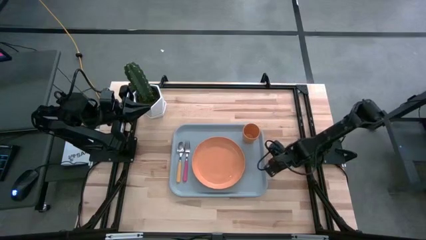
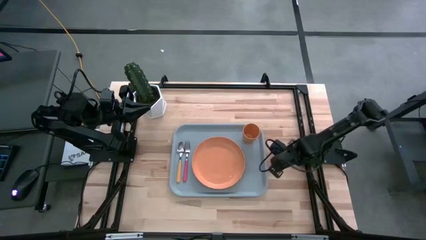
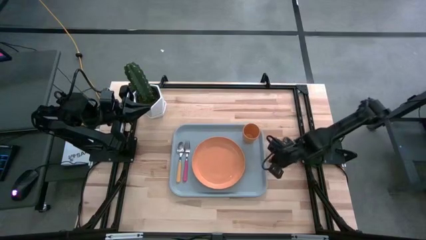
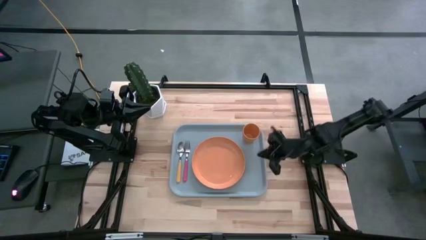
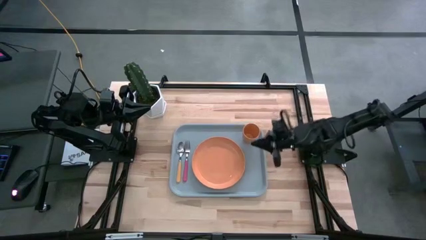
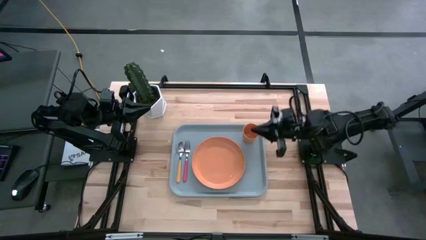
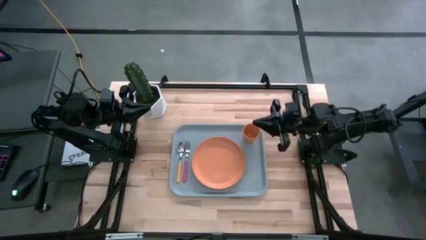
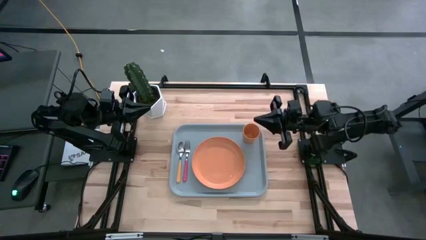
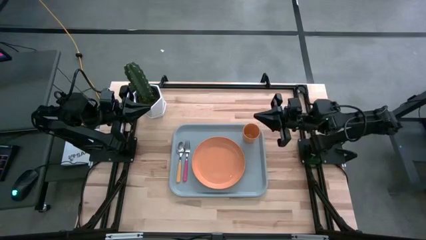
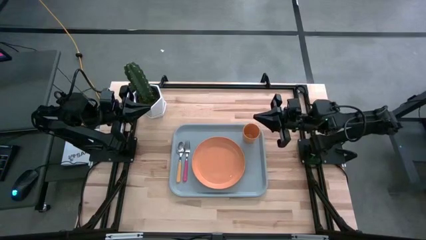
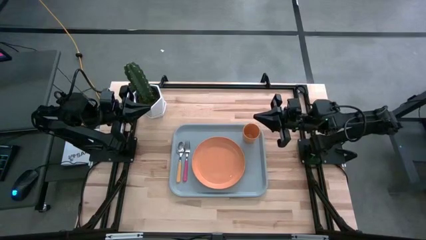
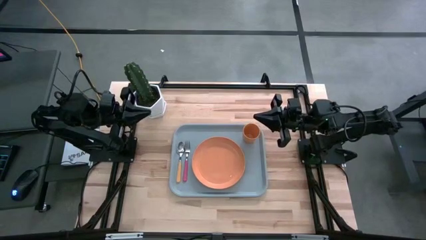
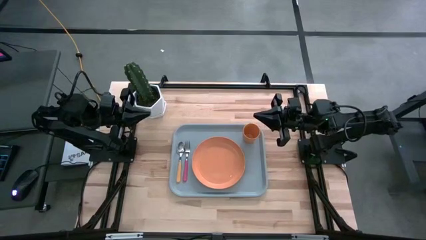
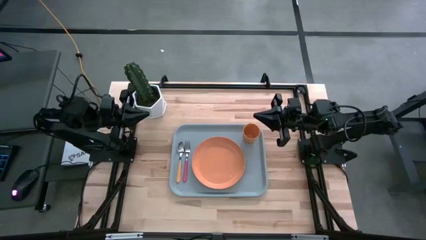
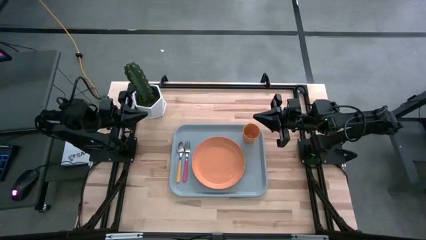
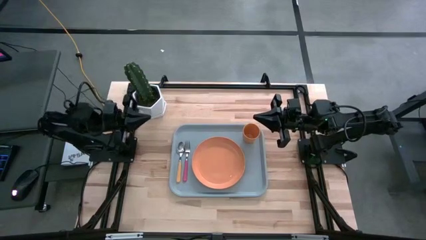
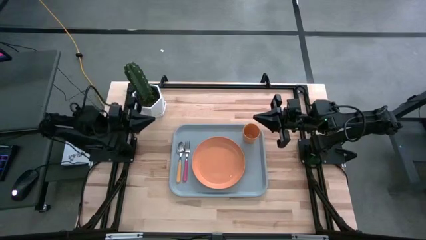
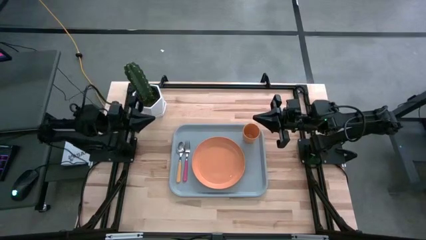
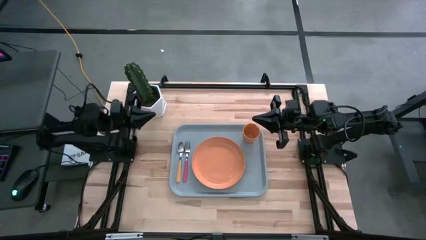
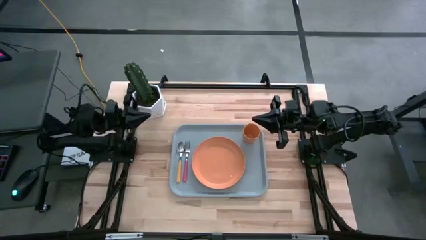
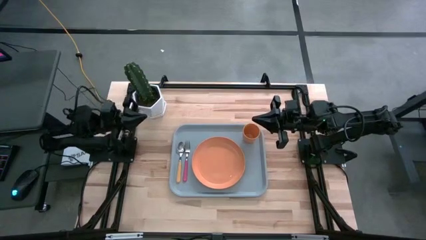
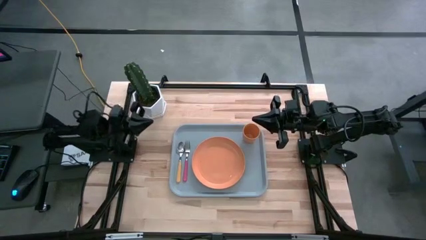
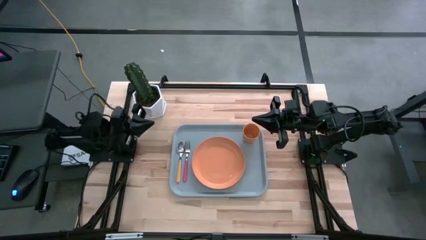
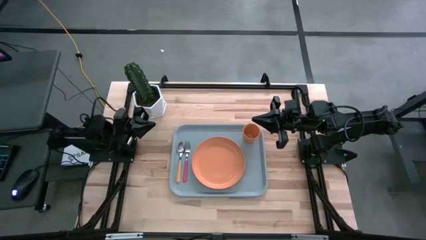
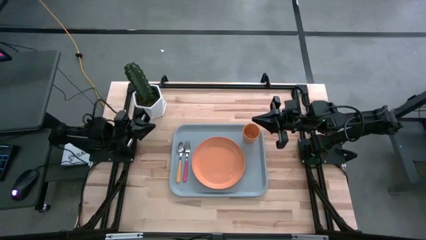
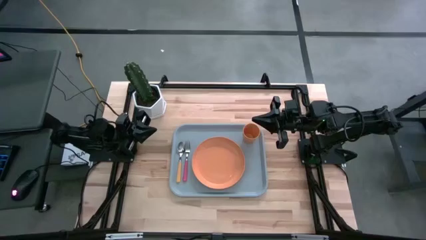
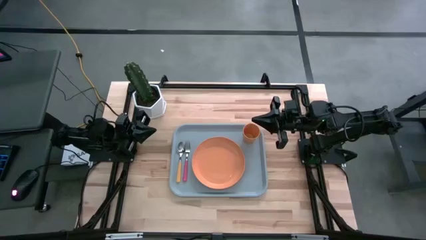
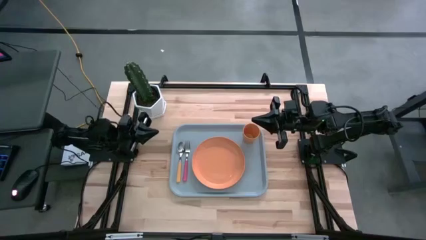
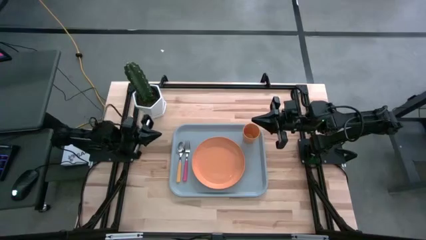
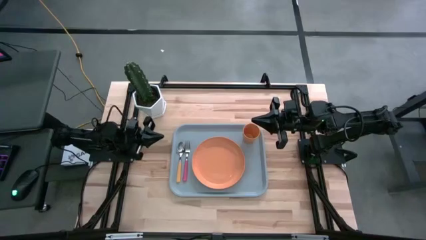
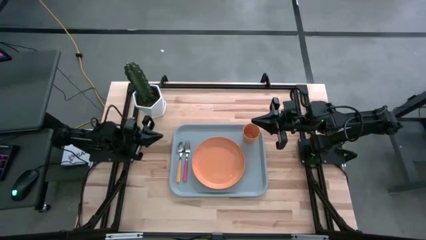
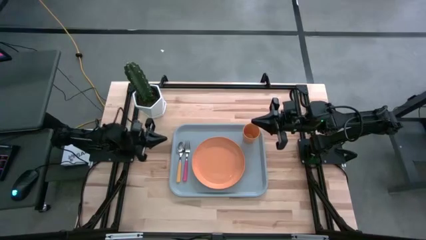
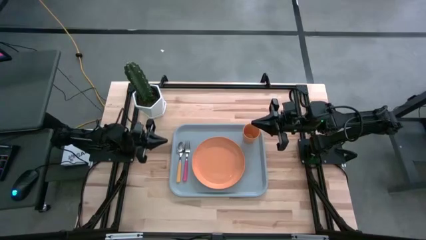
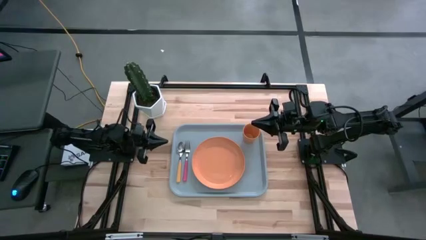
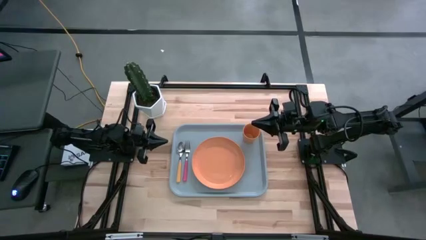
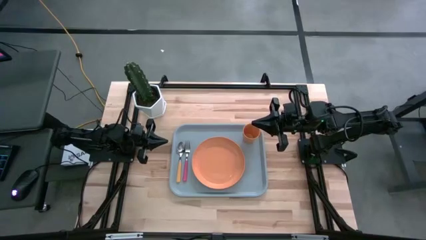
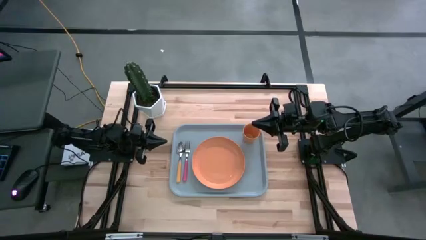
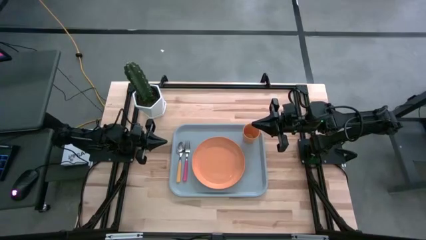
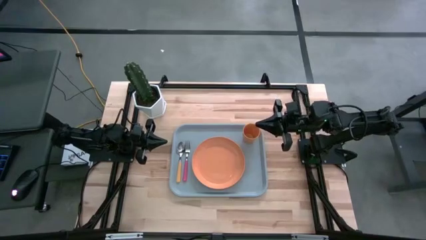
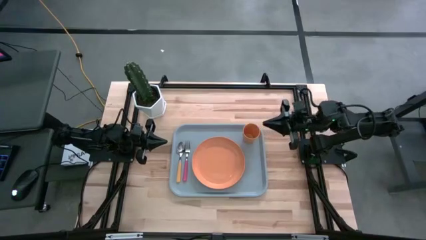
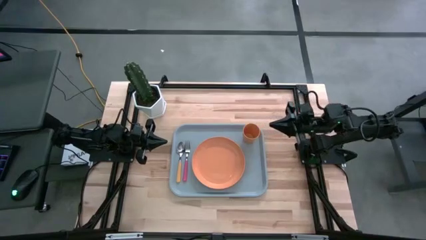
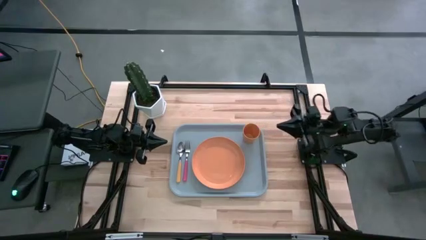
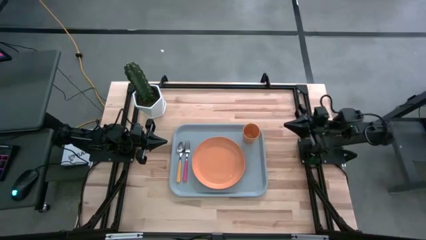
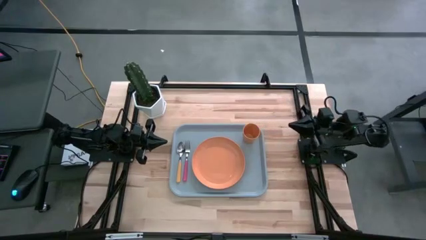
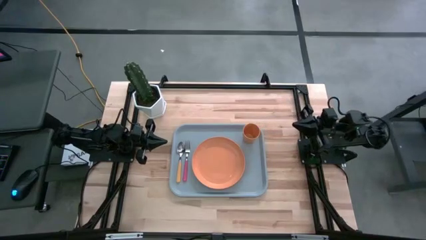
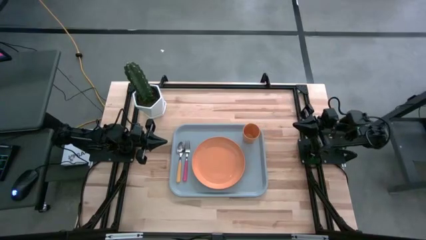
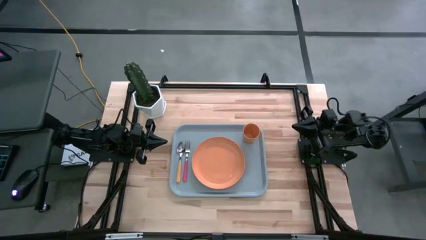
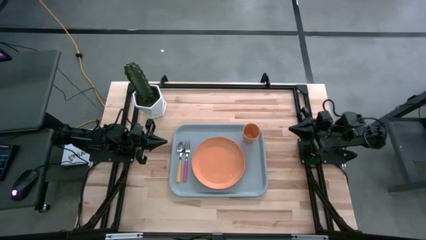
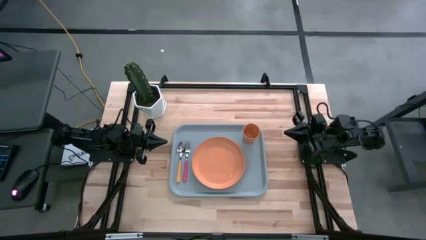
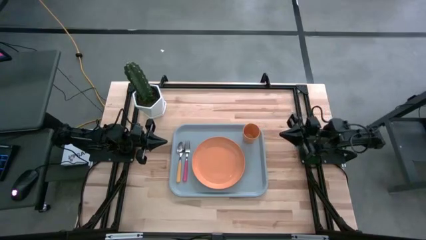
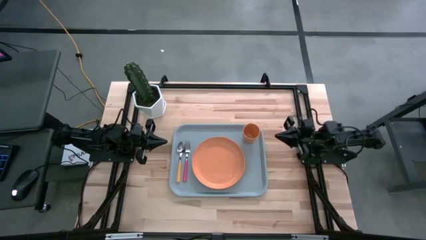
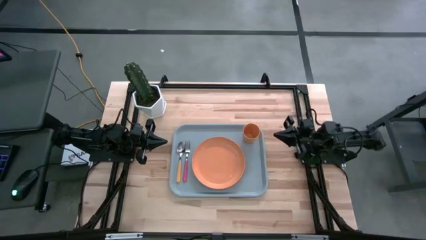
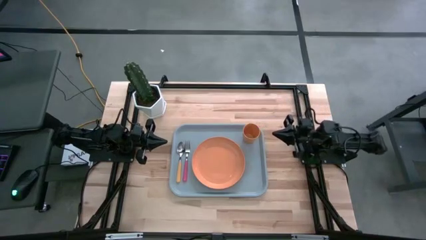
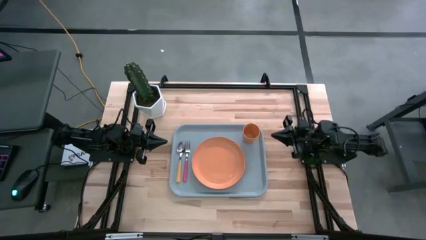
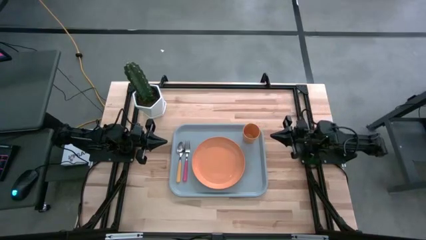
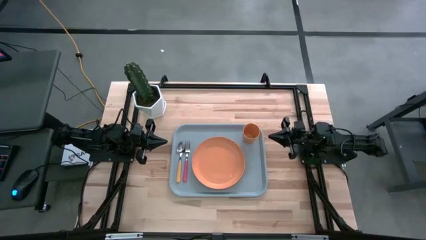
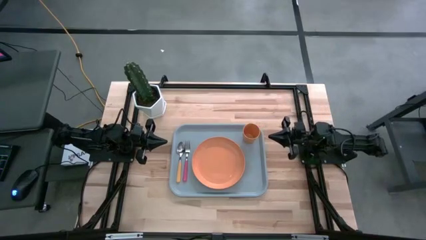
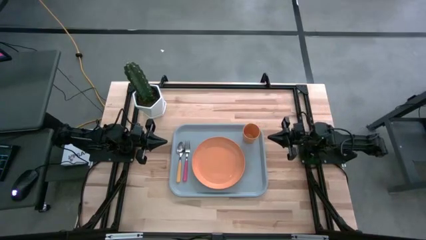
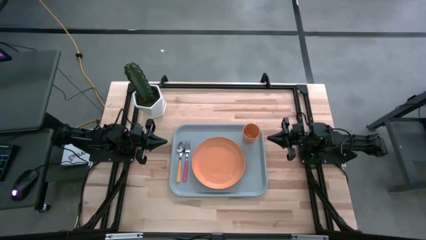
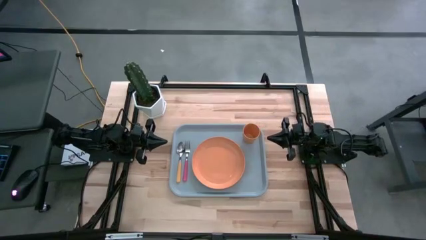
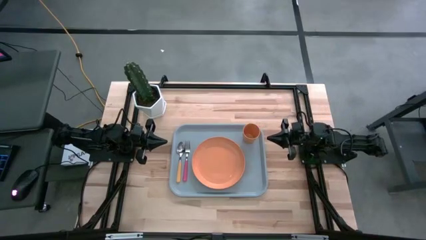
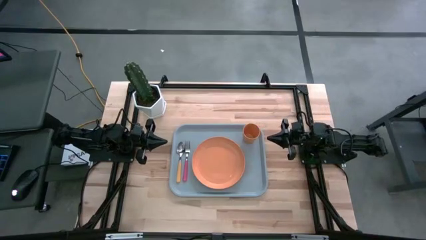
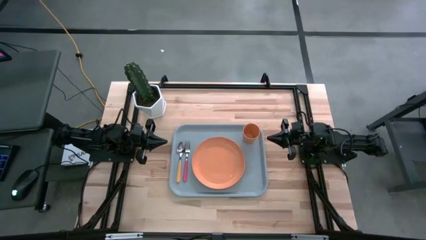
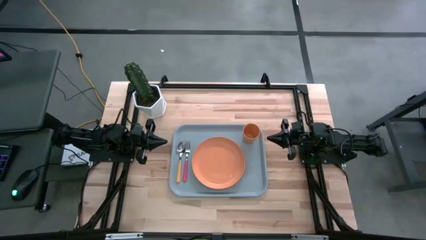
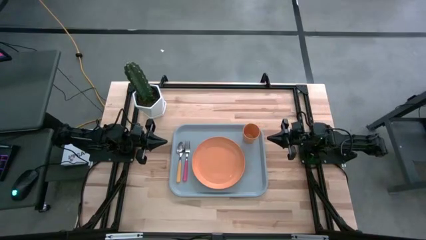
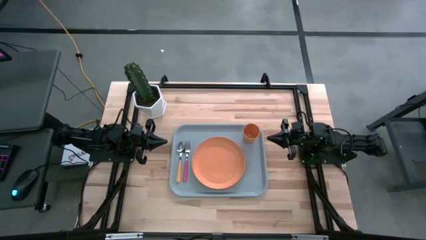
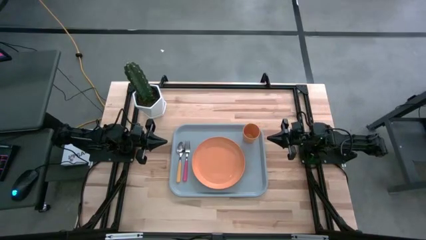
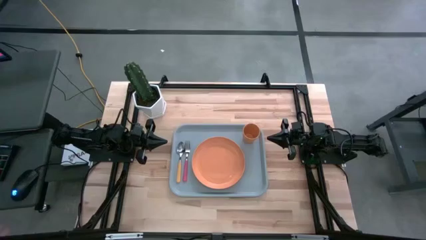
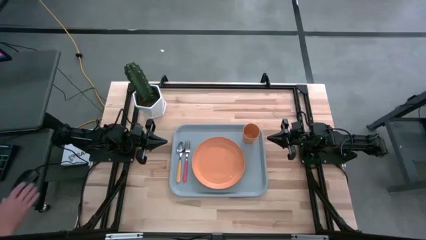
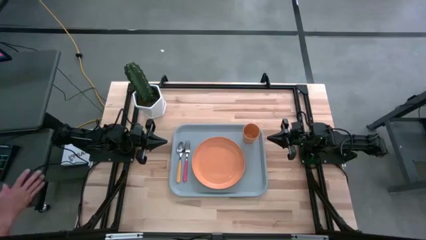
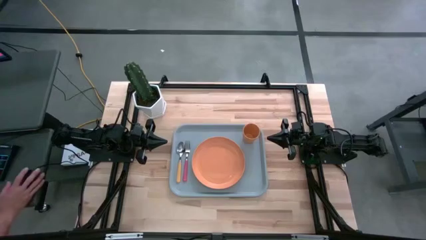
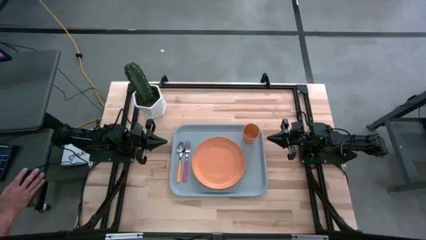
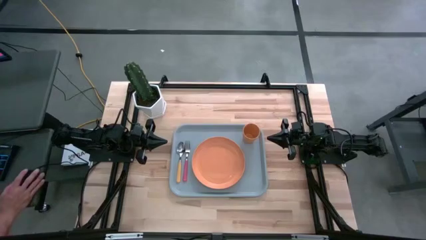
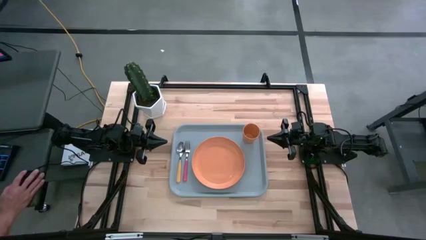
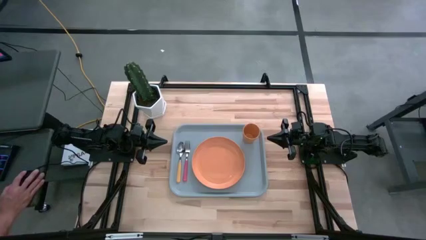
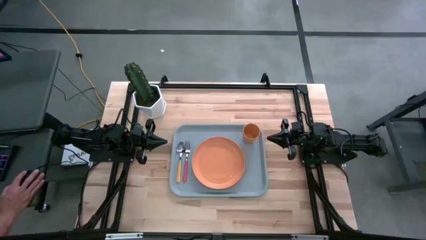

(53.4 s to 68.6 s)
Task: Pick and place plate/cup/fork/spoon on tray
Return to Home Position

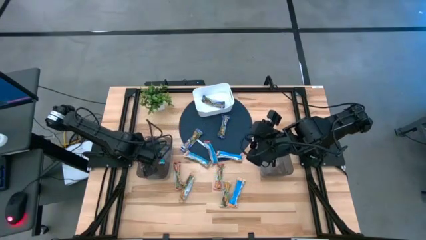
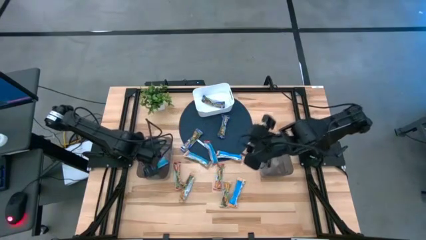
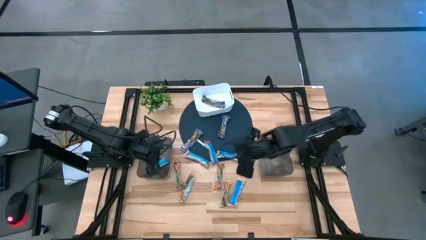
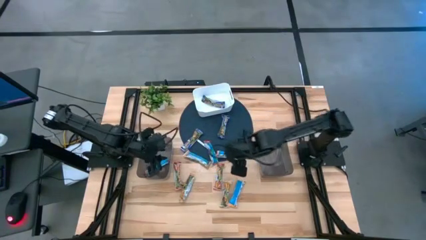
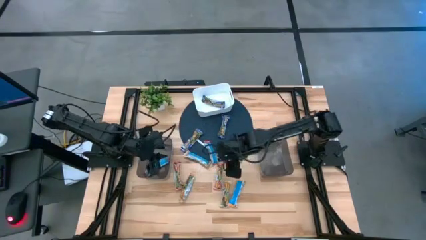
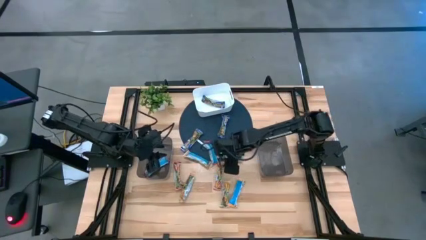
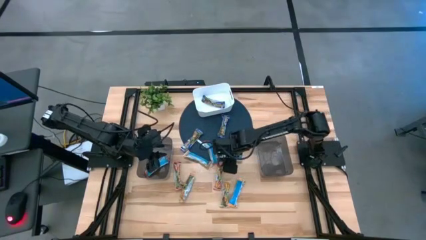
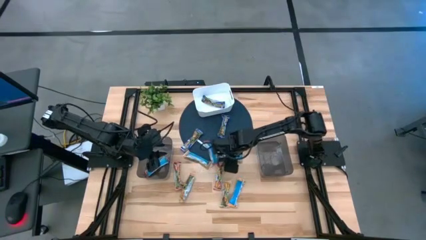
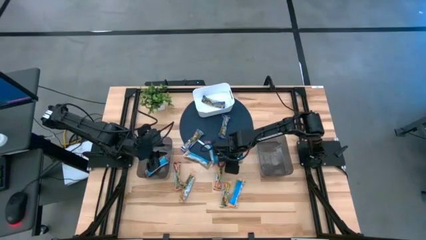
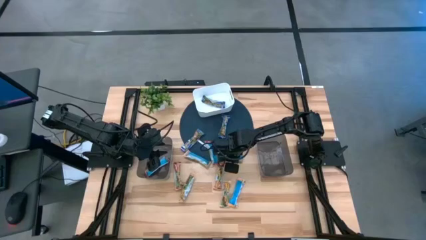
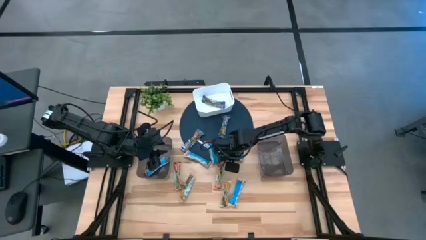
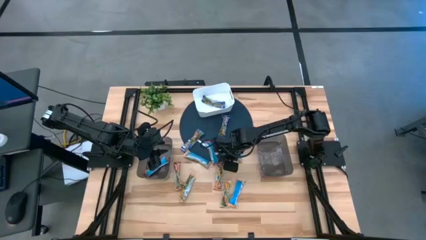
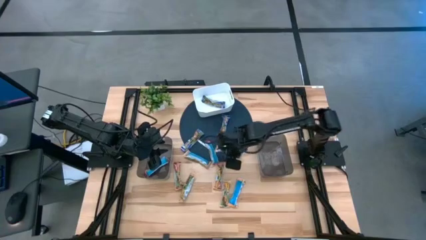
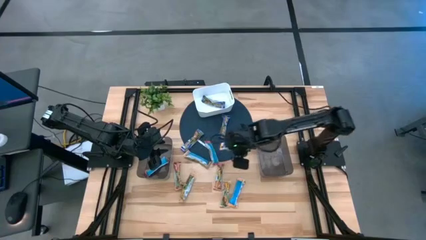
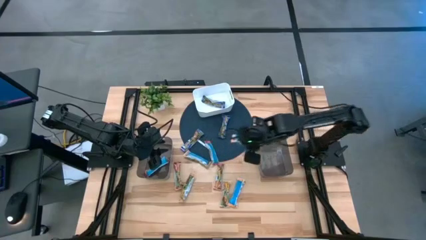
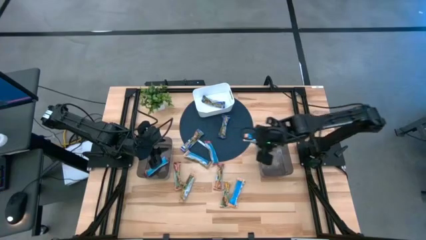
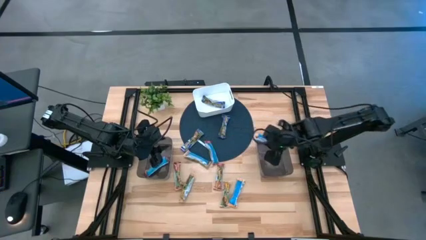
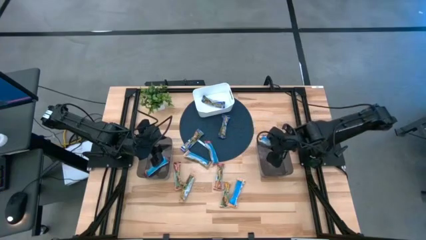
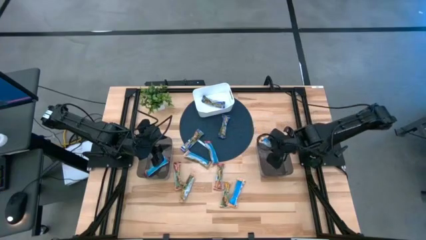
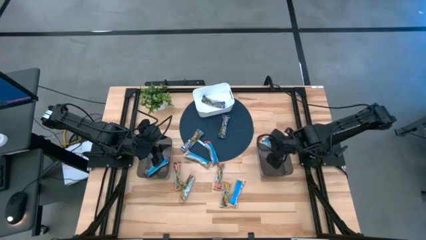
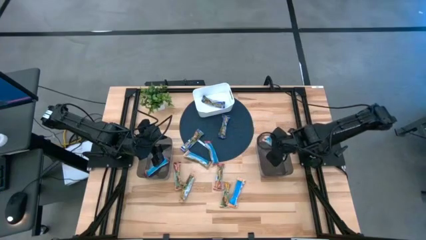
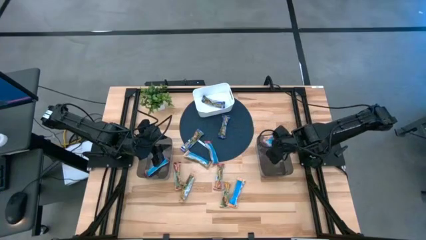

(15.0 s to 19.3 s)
Task: Pick and place Granola Bars by type
Put the yellow granola bar into the right black bin
